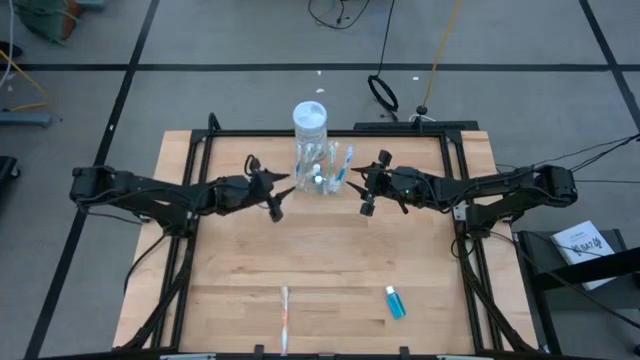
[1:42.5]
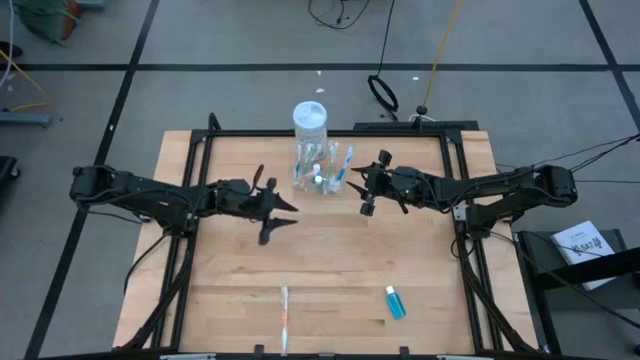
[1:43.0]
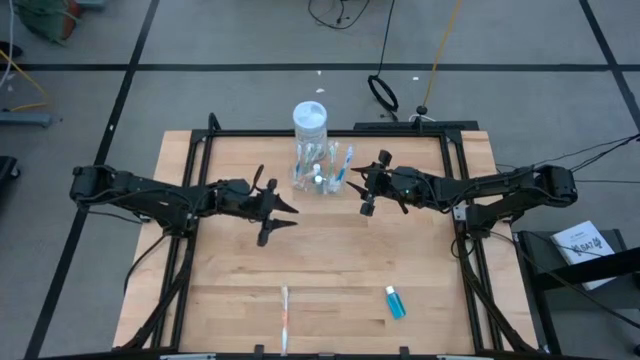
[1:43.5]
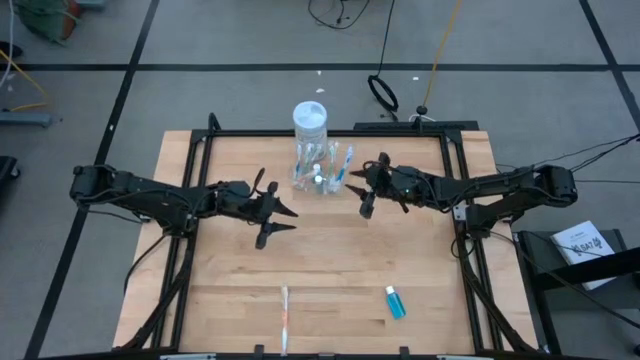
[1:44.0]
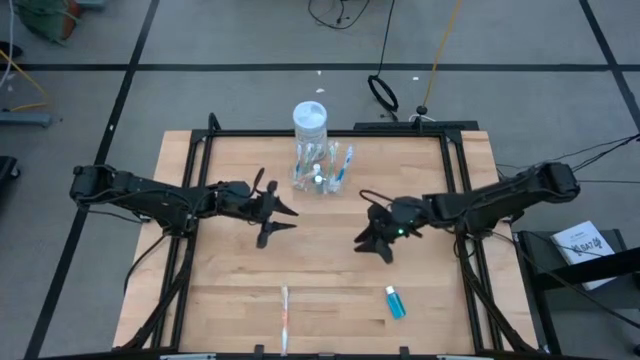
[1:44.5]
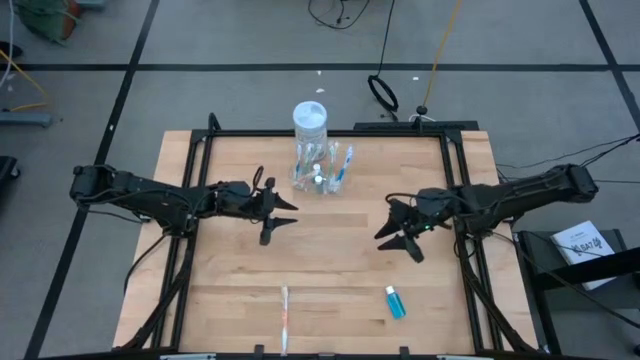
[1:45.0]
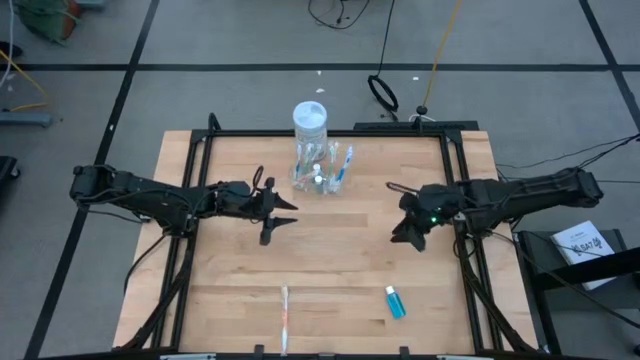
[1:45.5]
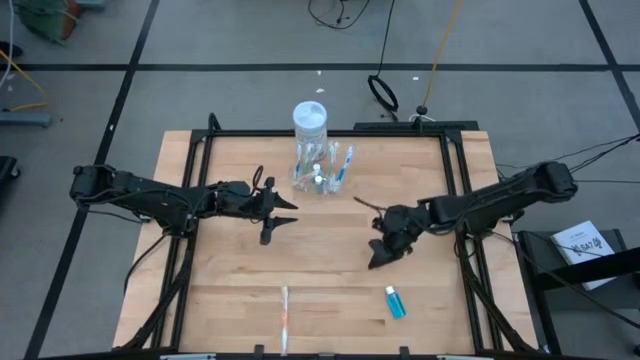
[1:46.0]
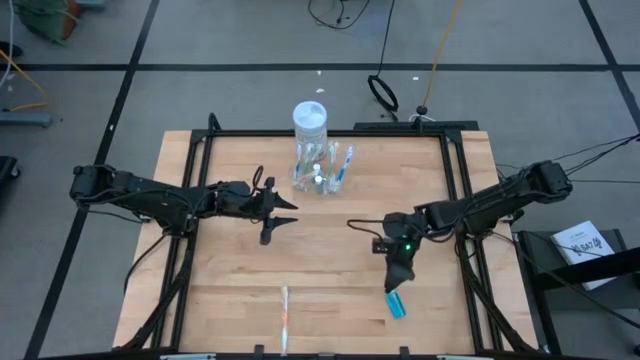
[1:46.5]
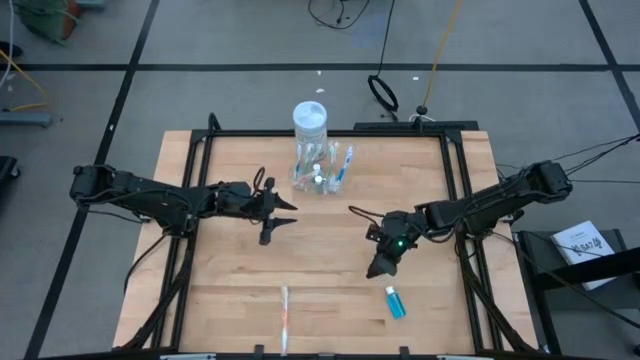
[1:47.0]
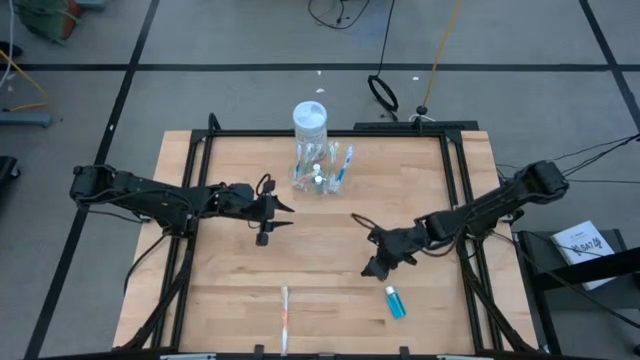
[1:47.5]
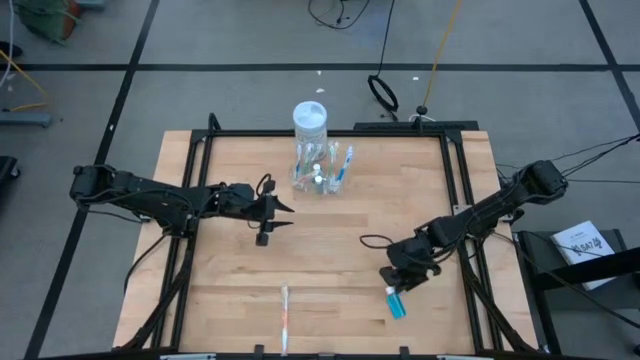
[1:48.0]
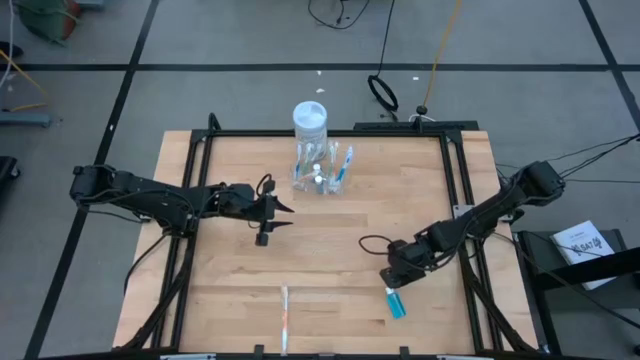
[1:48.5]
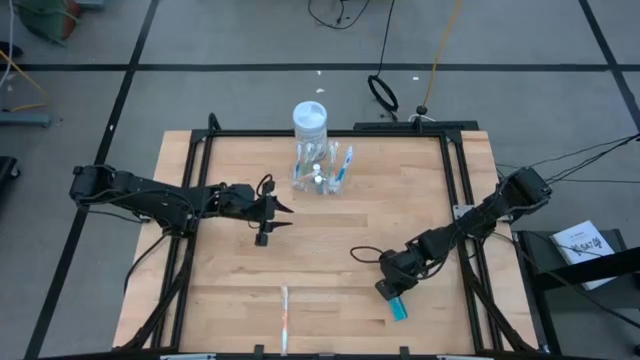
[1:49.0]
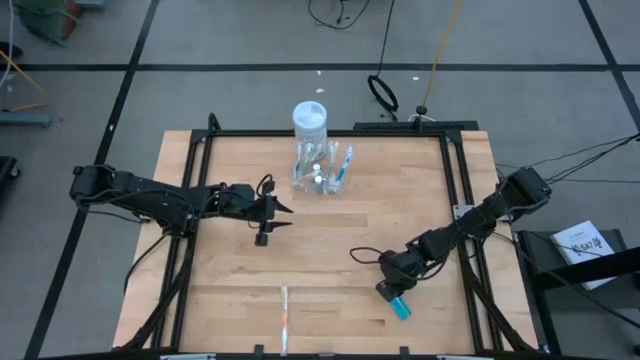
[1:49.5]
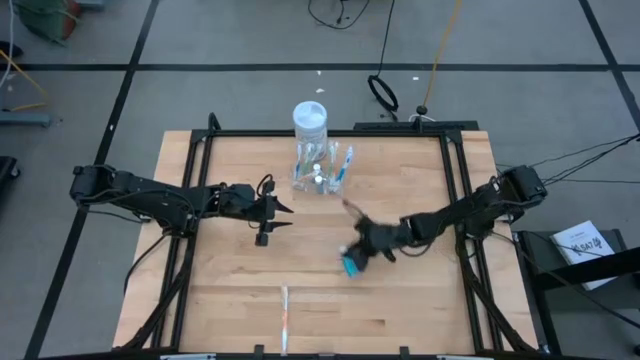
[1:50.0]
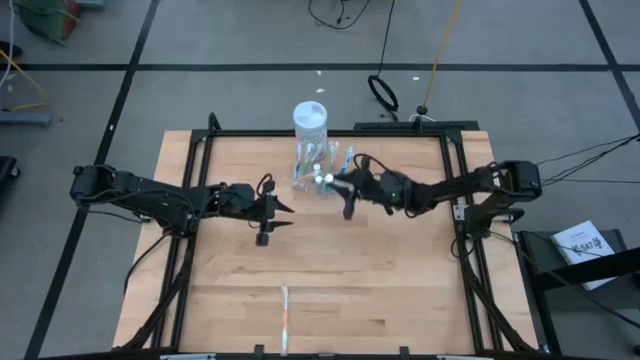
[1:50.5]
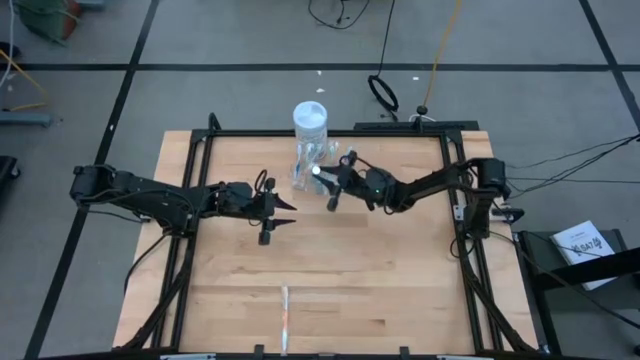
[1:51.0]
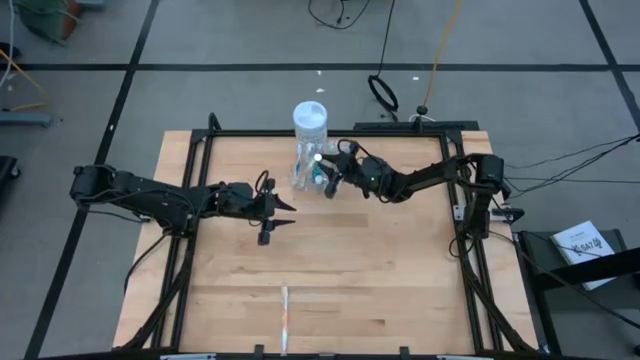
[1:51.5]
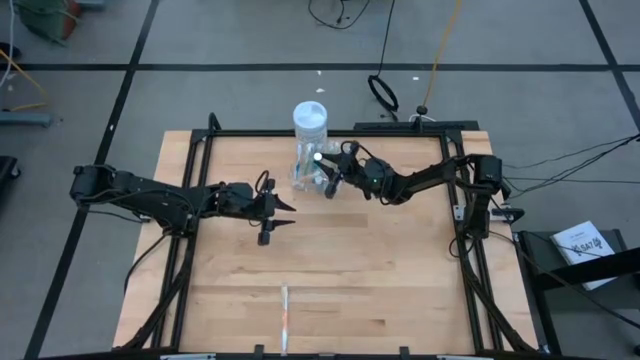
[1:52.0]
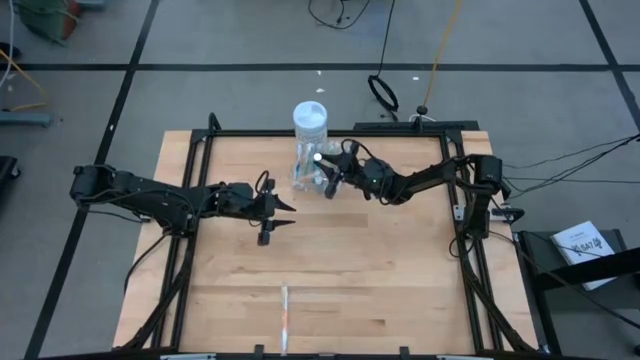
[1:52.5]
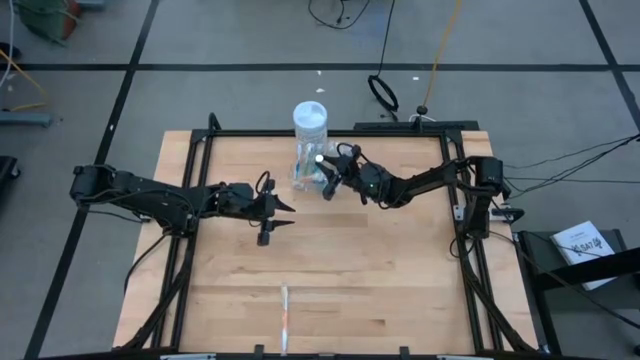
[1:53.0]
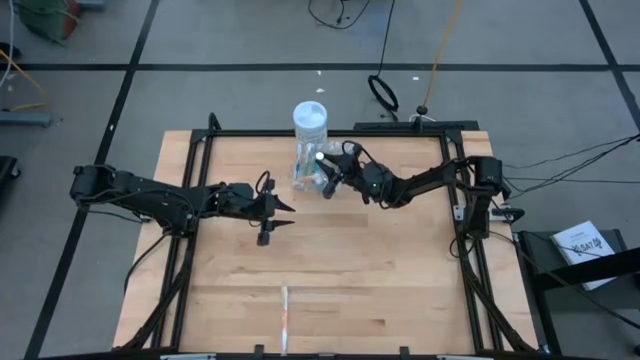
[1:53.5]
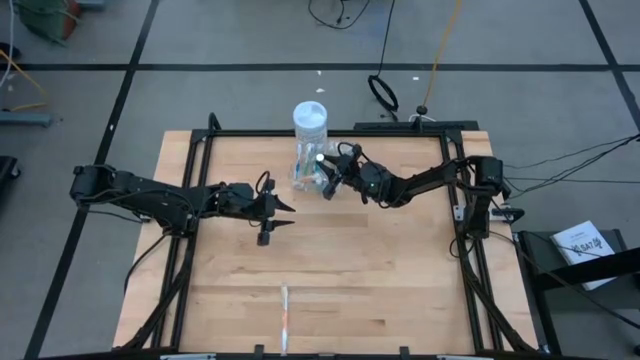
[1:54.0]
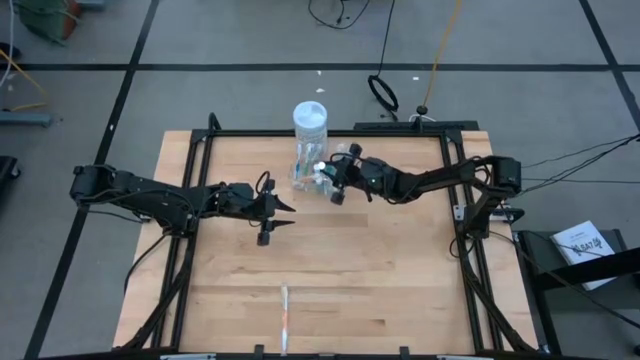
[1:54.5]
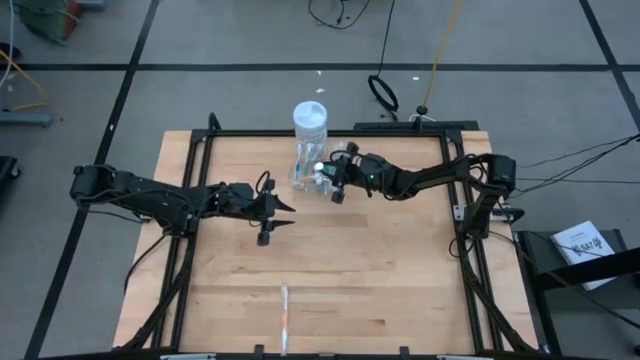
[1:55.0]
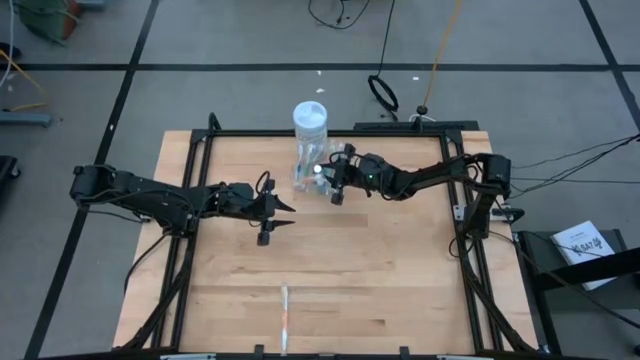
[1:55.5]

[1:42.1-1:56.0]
Task: Pick & Place toothbrushing station
Put the blue mouthwash bottle into the transparent organizer

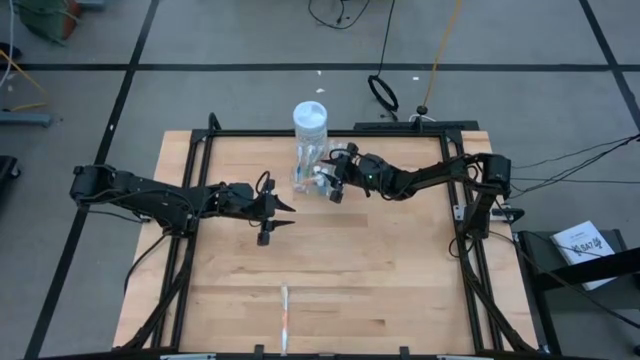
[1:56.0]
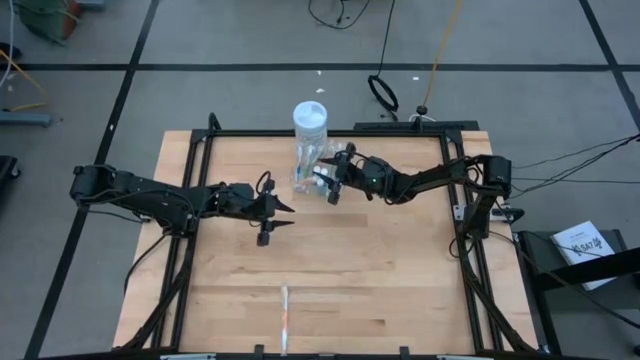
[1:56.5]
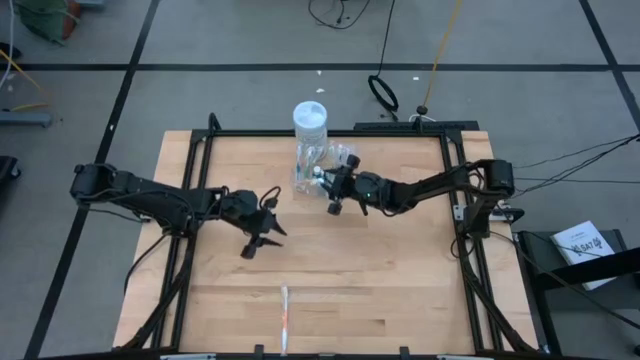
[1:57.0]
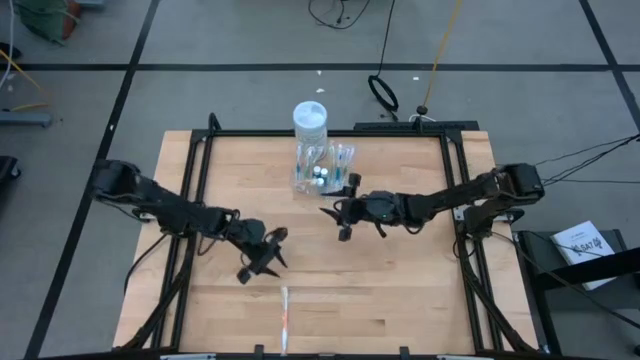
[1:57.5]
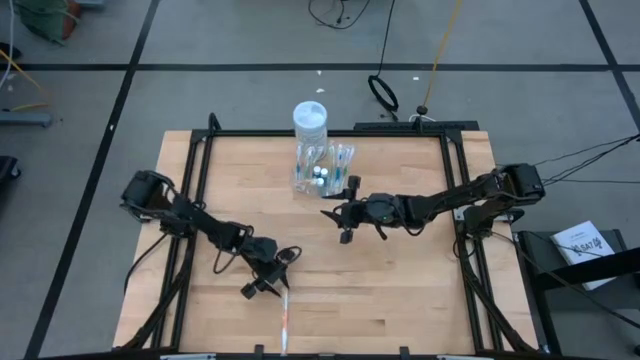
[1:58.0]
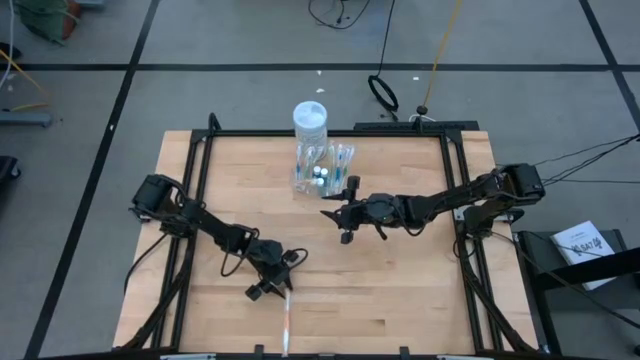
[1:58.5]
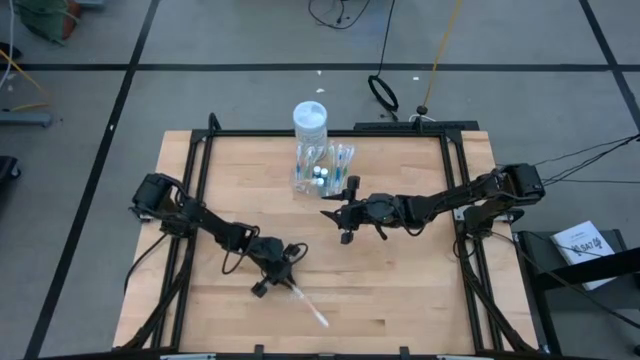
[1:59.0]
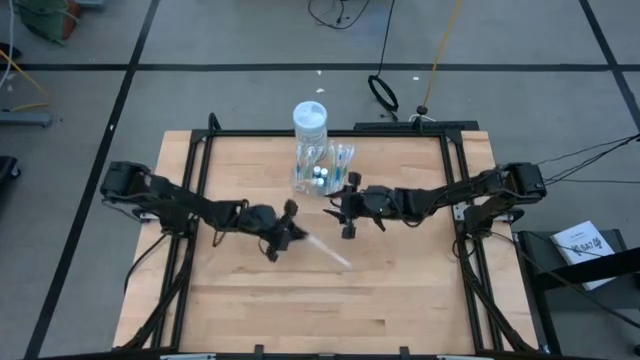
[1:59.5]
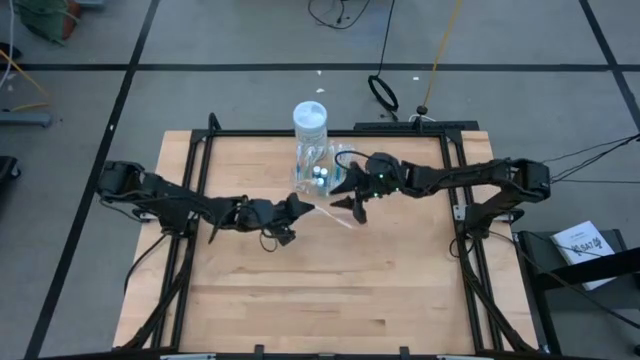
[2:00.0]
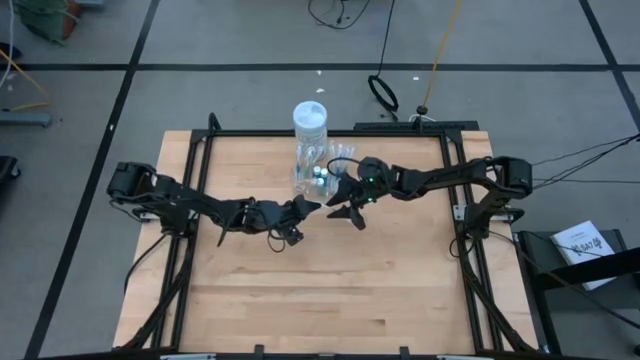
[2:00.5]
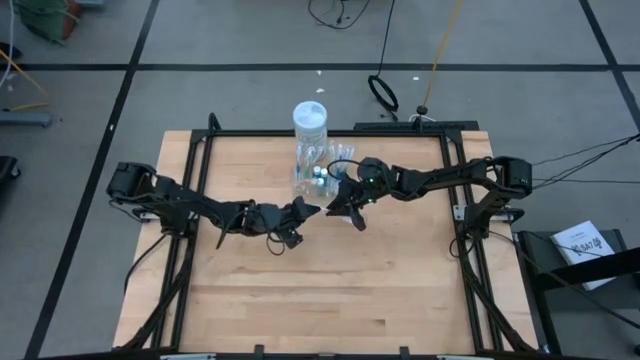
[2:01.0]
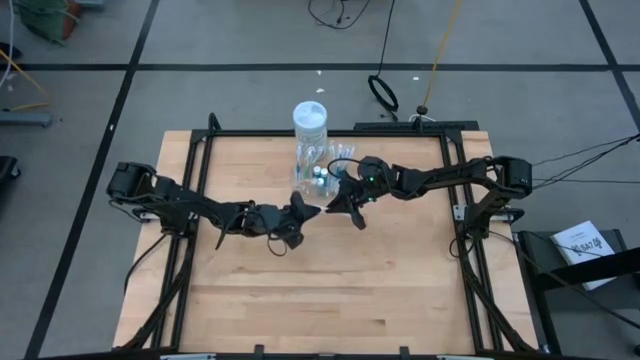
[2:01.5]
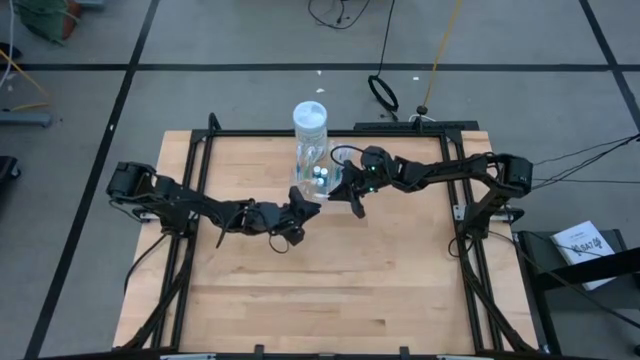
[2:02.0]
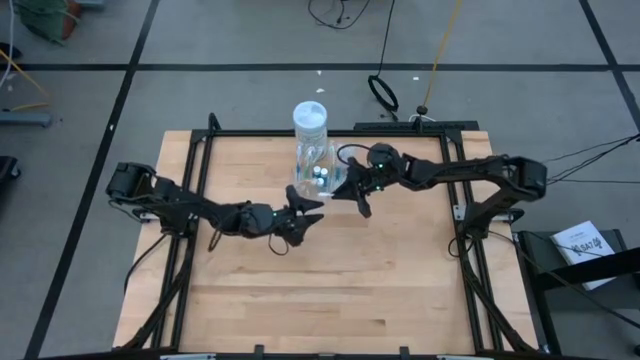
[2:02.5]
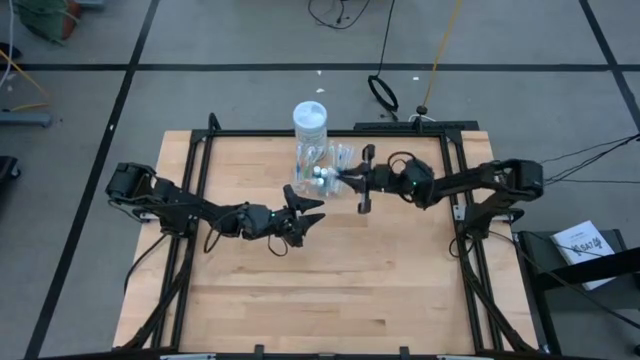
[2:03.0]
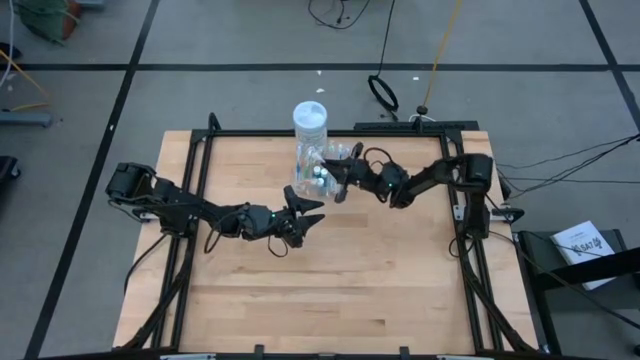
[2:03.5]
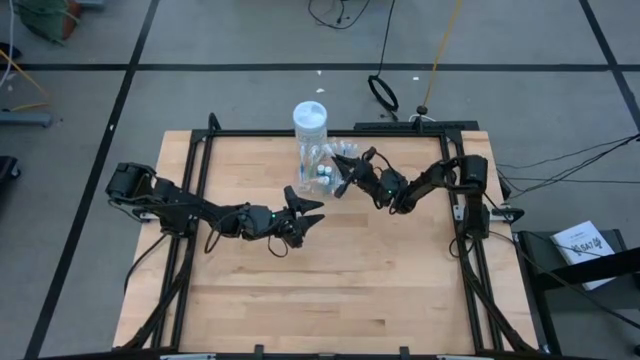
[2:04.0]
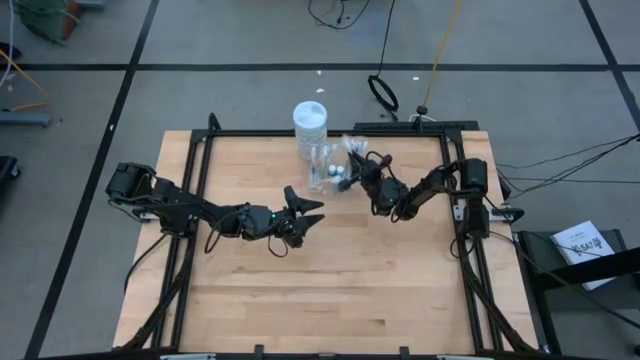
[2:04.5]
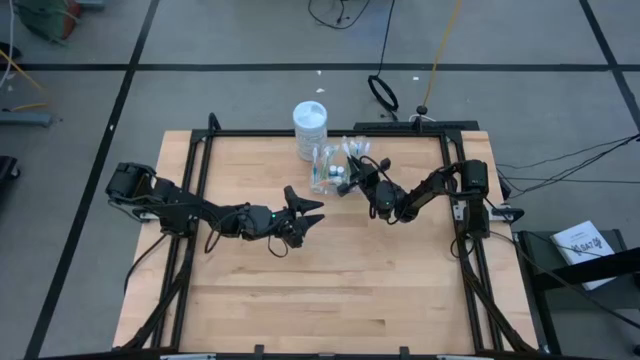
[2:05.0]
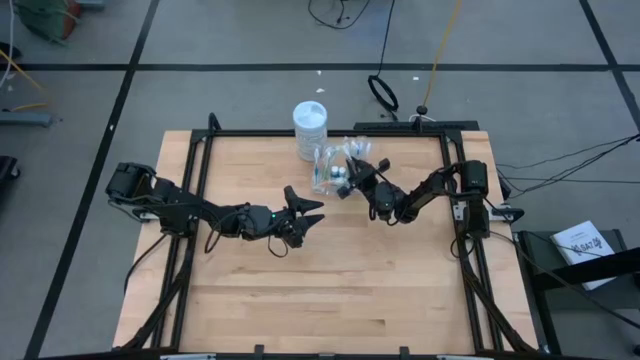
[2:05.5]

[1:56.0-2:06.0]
Put the orange toothbrush into the transparent organizer
